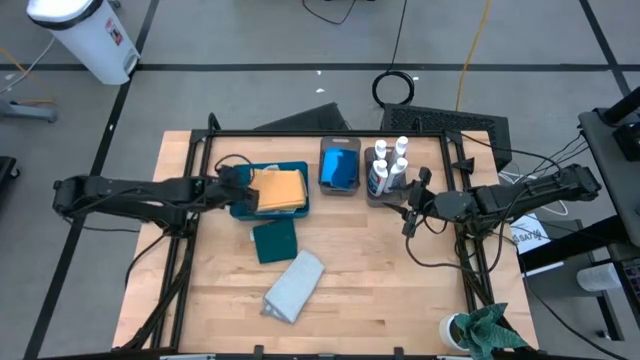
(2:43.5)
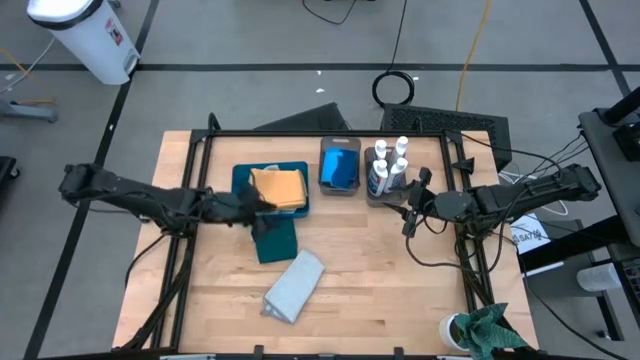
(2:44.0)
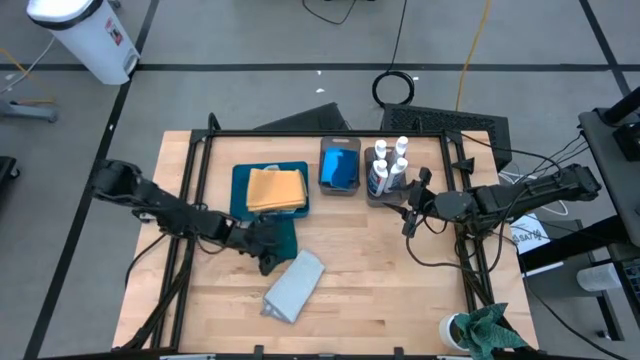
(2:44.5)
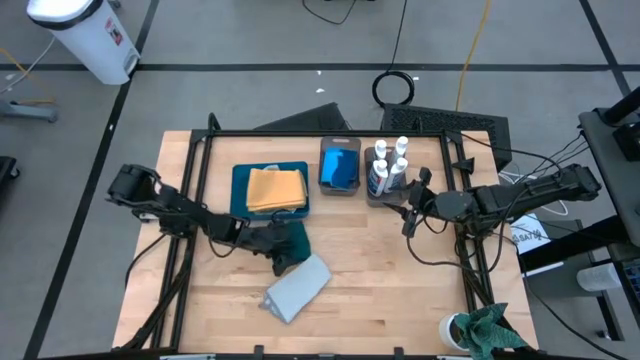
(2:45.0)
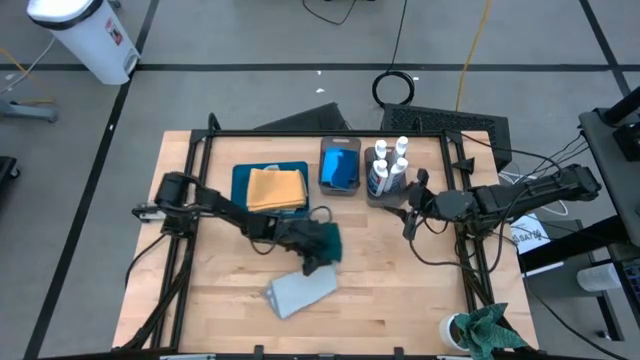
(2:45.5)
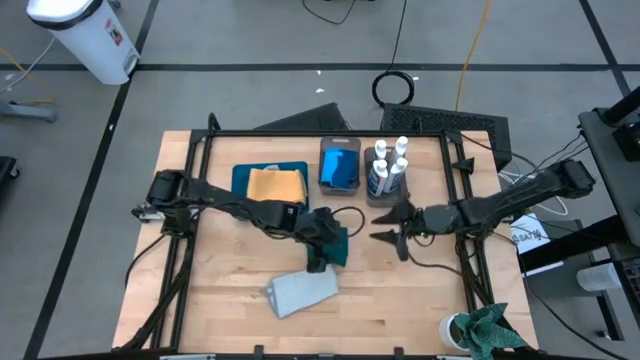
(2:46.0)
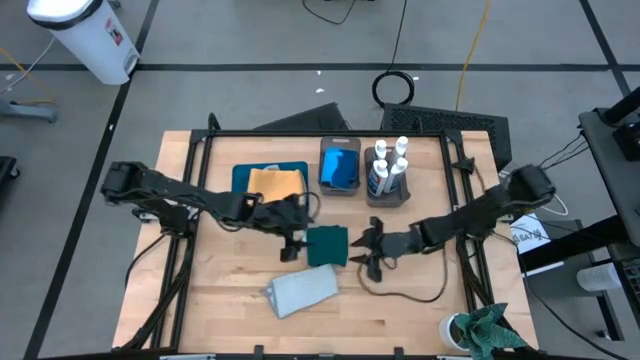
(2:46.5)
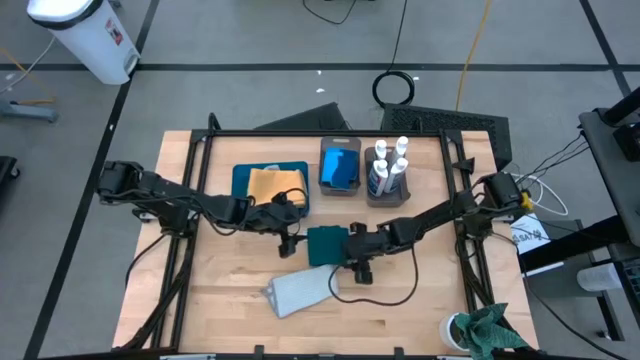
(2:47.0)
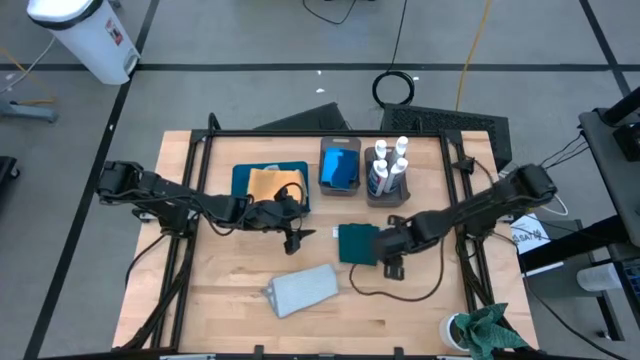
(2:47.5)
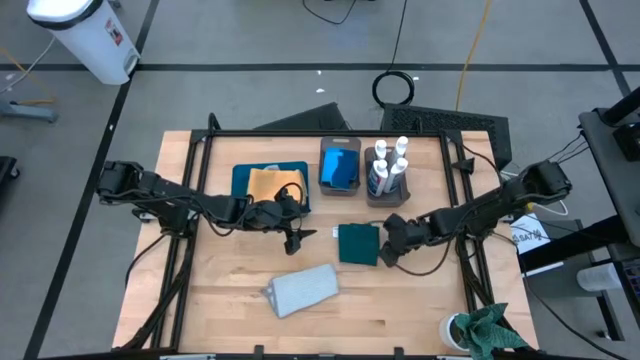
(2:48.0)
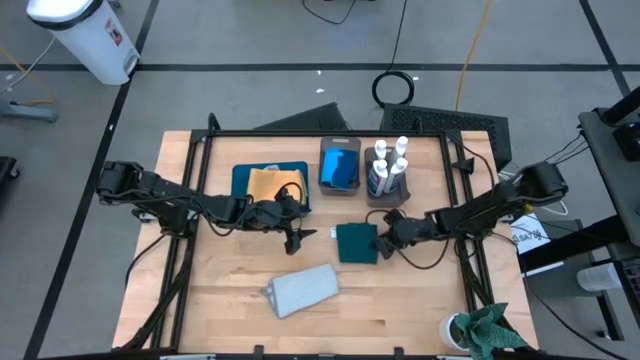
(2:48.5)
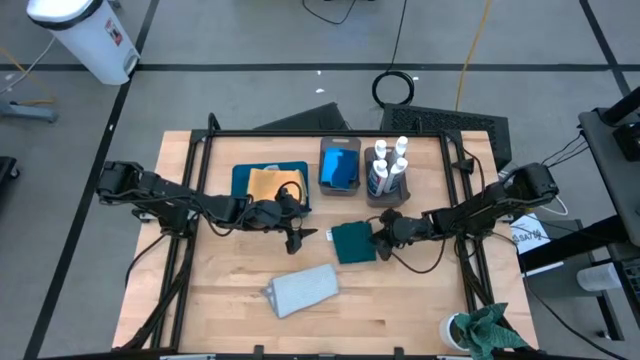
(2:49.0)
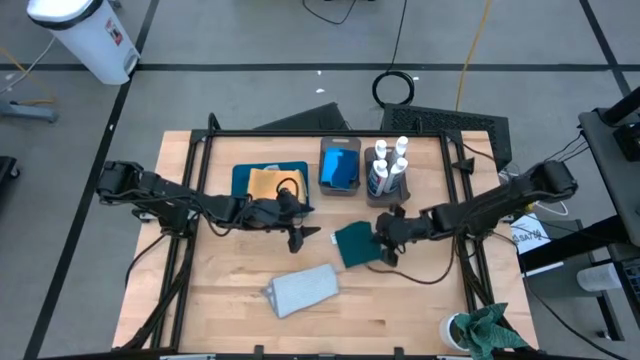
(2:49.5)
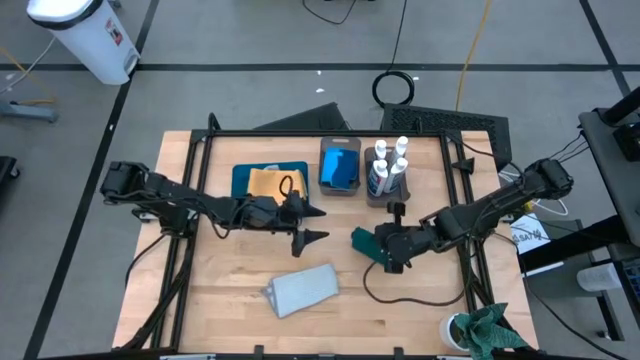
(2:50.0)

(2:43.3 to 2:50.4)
Task: Pick & Place Kitchen Items
Put the dark blue microfiber towel into the blue bin

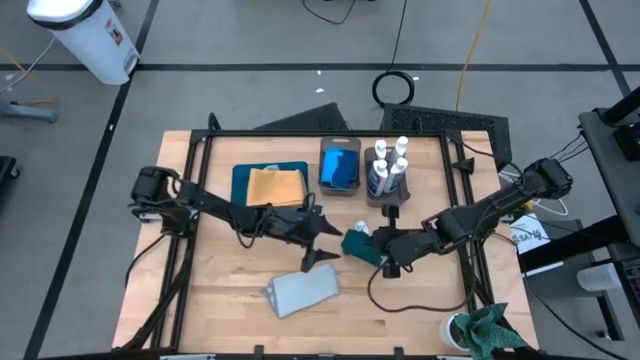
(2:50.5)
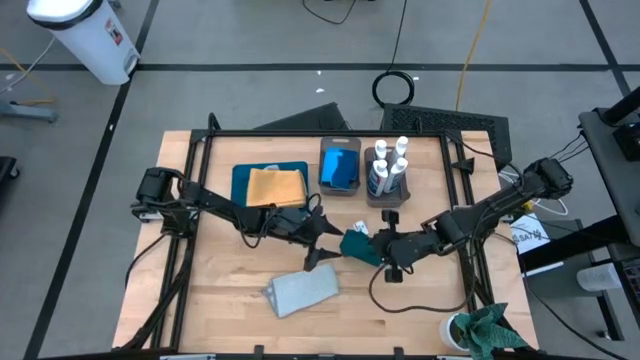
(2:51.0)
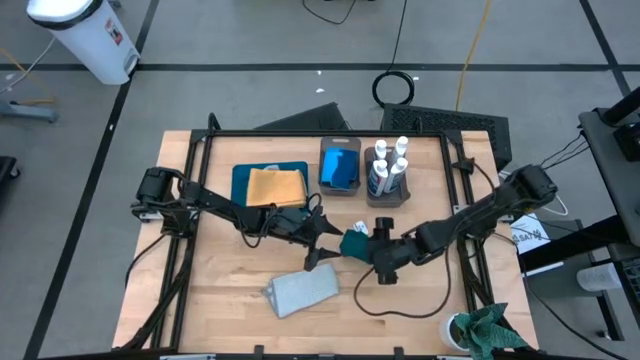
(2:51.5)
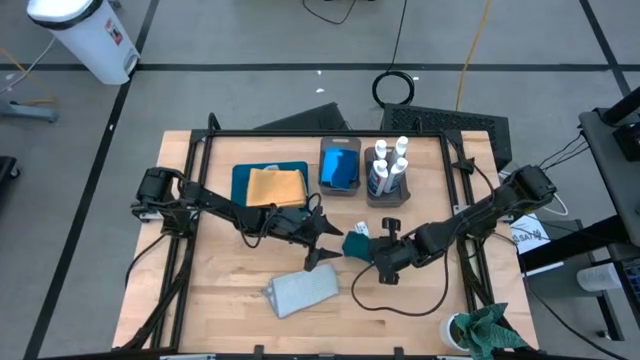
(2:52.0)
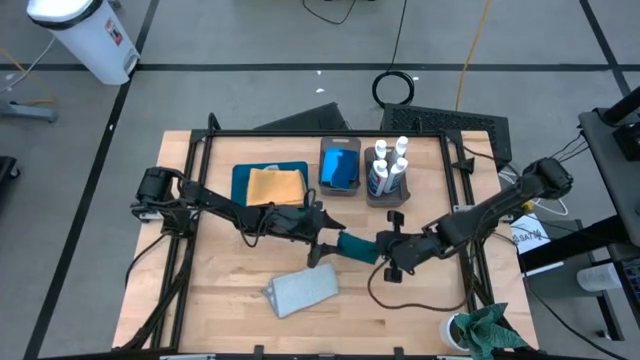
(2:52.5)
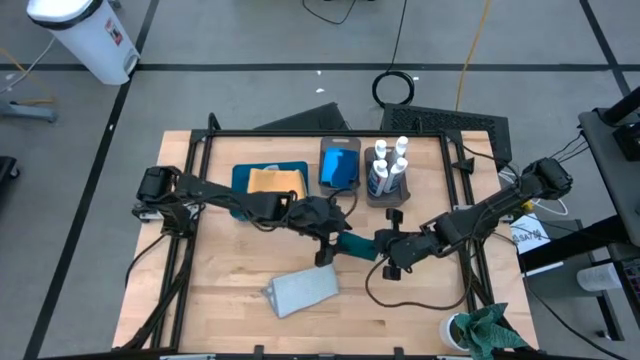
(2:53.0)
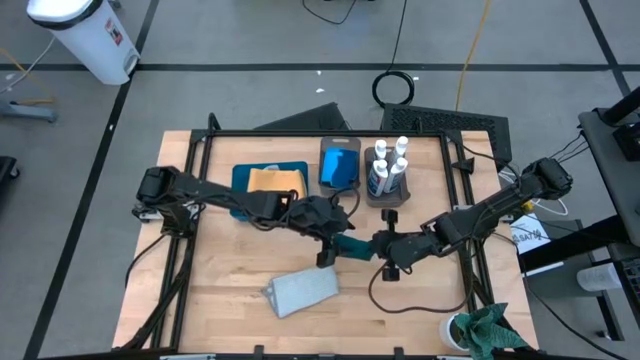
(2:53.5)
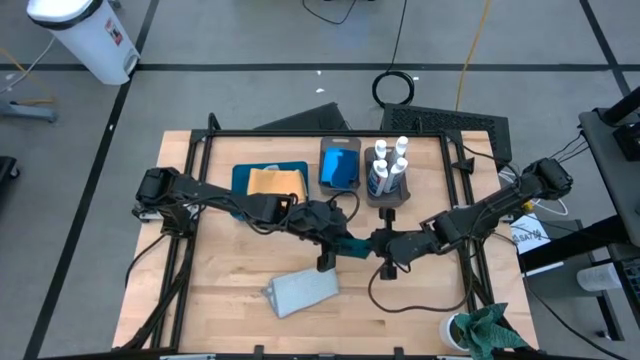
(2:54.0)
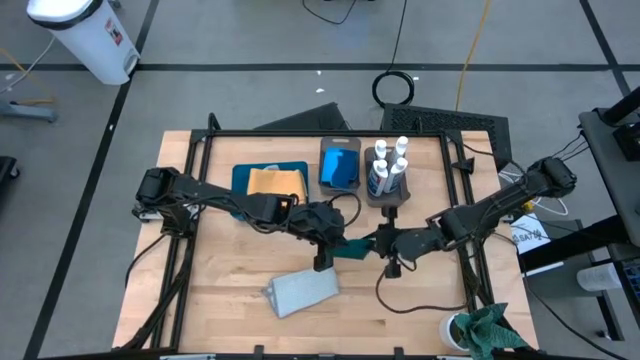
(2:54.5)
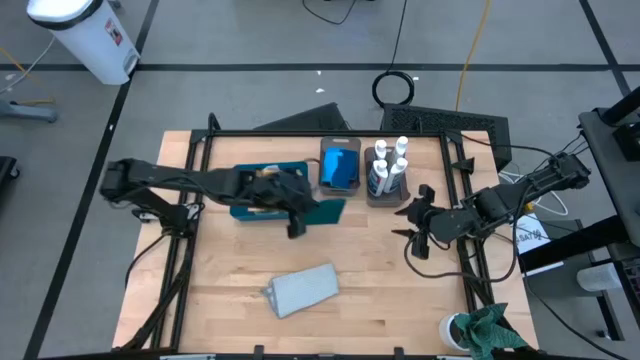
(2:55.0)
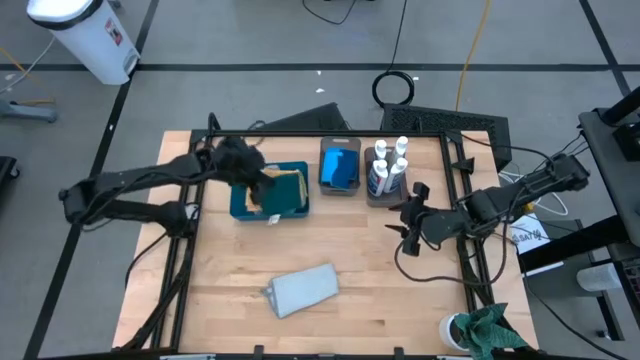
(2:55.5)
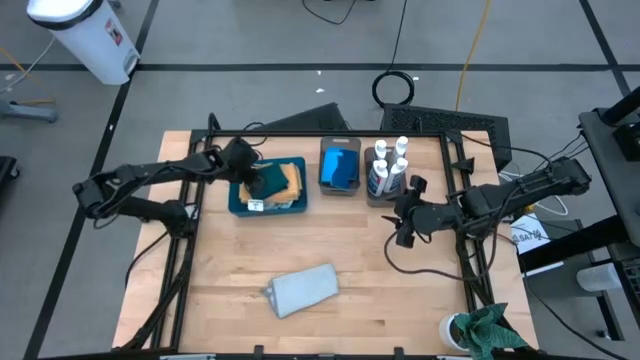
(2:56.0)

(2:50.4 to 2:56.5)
Put the dark blue microfiber towel into the blue bin

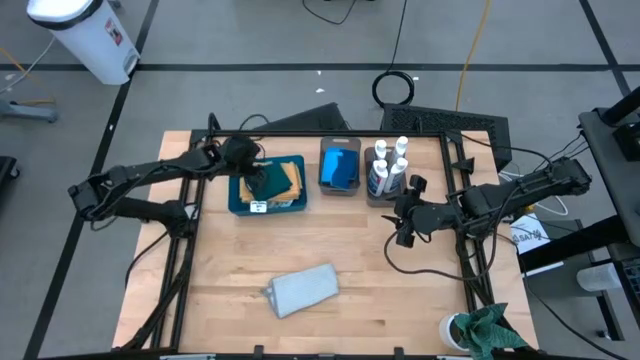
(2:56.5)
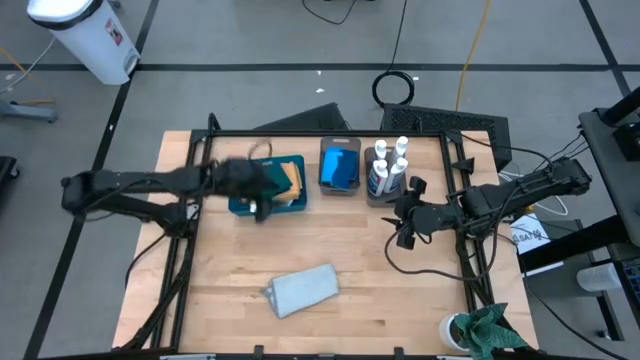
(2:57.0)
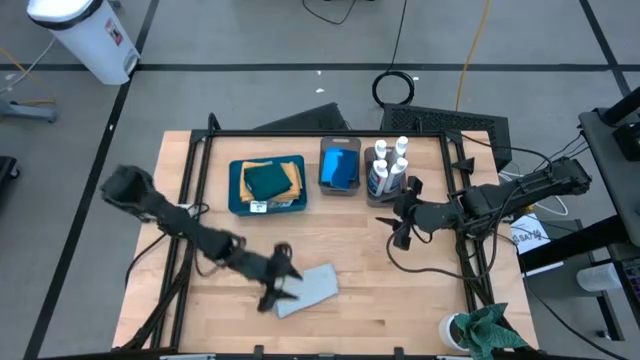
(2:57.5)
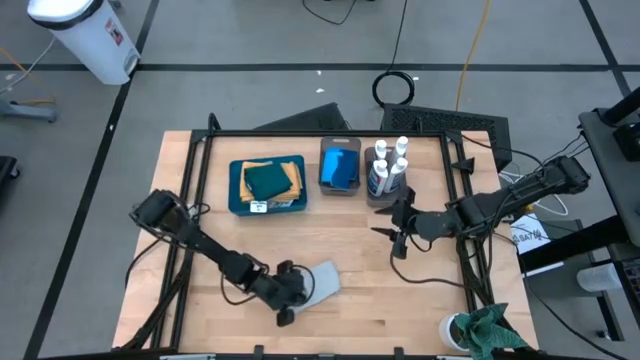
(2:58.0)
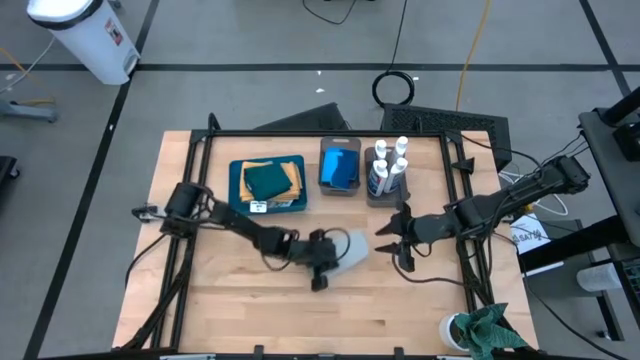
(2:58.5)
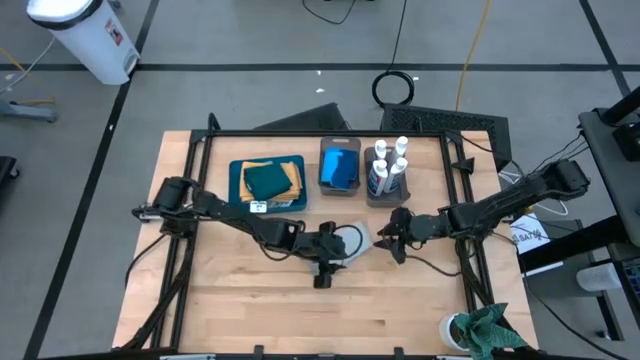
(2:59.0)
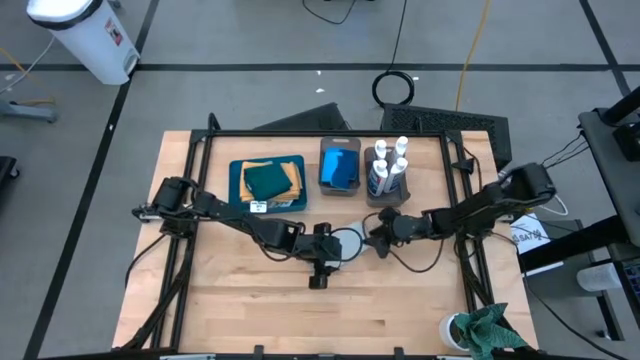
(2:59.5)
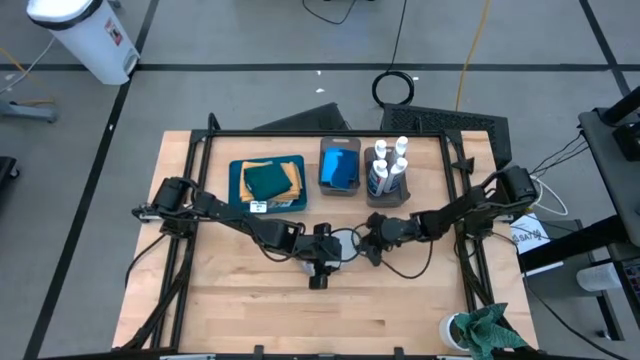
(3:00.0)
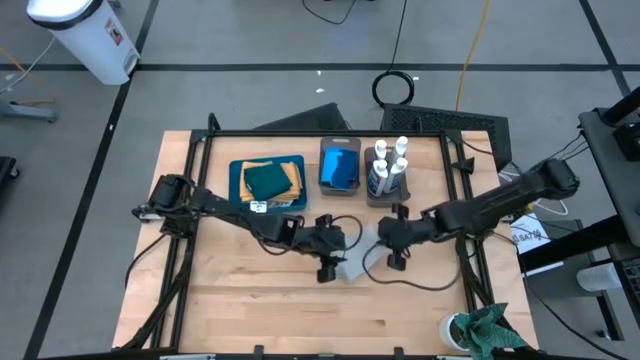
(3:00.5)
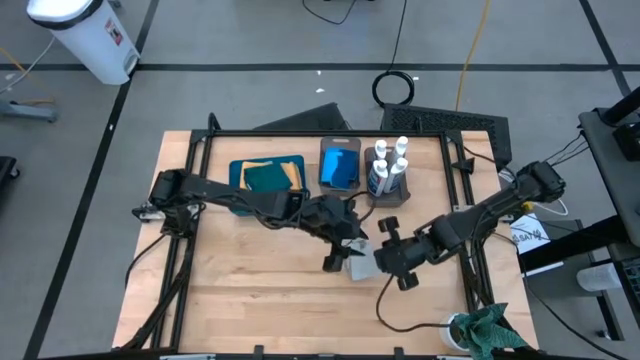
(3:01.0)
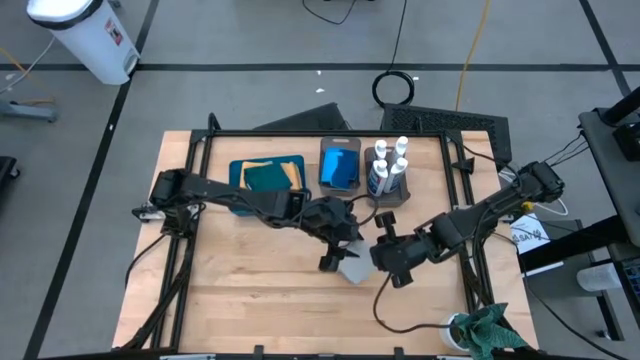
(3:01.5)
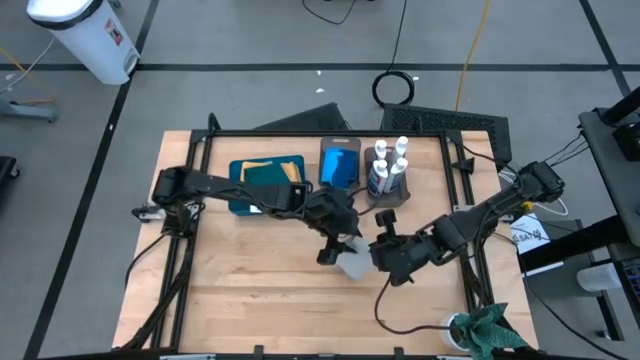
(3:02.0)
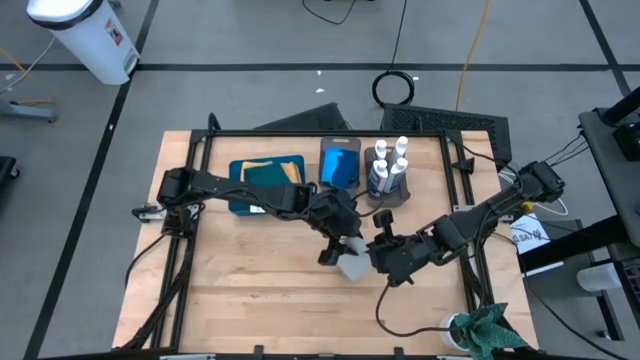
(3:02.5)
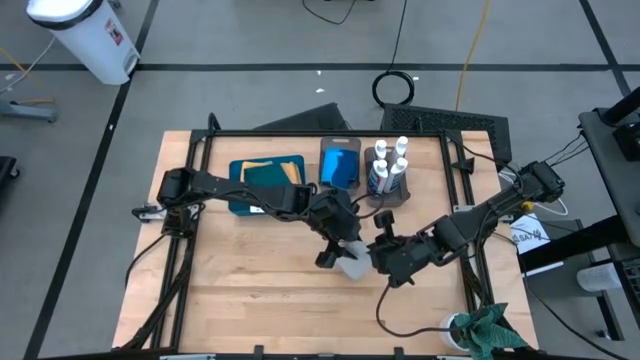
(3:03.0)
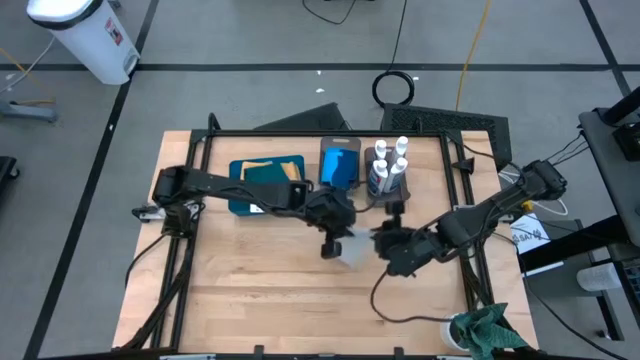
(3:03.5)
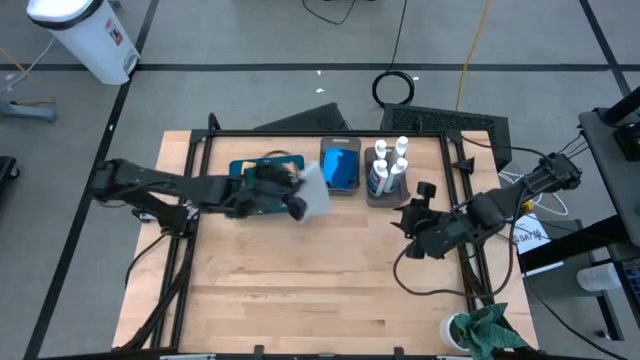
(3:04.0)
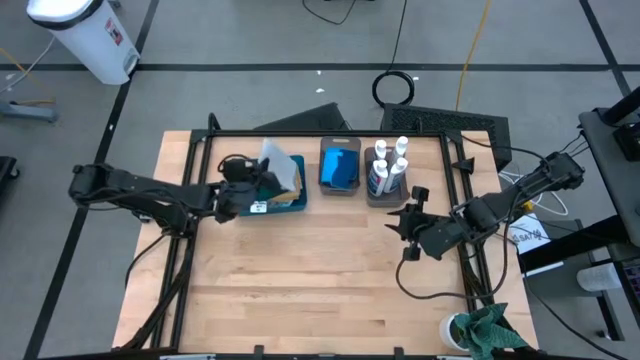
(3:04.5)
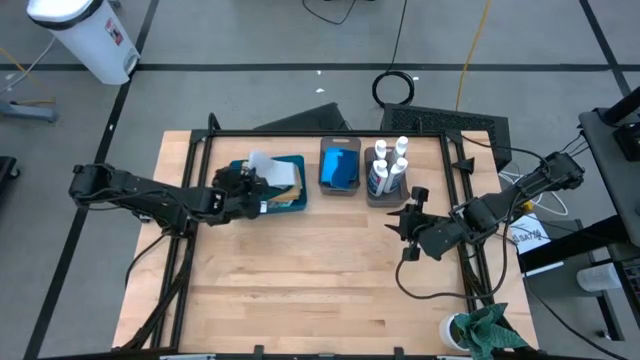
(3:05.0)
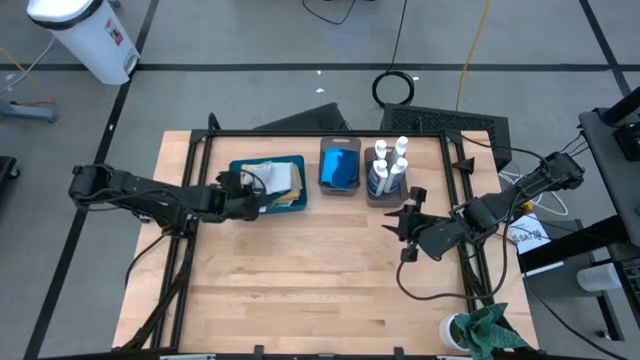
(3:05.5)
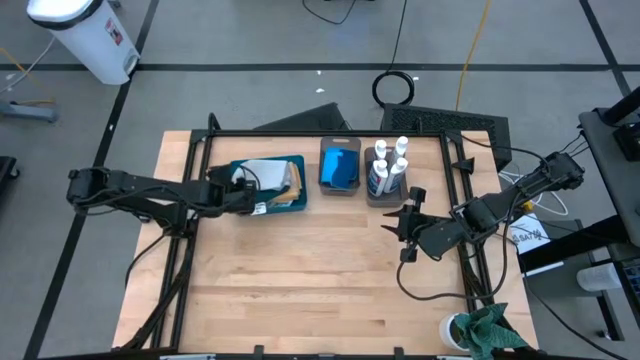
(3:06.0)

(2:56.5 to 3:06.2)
Put the gray microfiber towel into the blue bin
